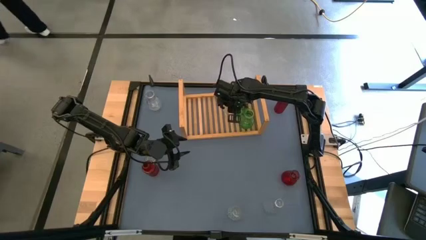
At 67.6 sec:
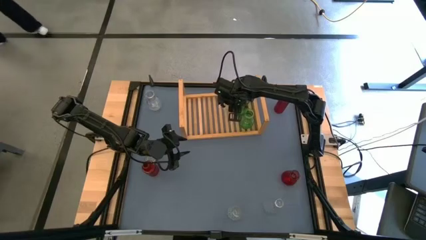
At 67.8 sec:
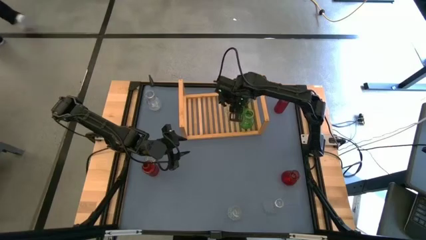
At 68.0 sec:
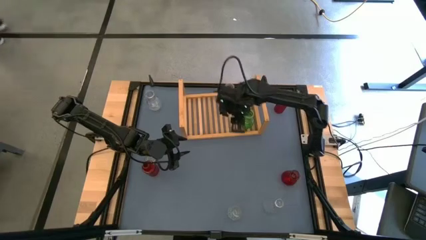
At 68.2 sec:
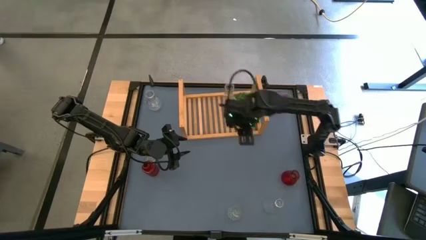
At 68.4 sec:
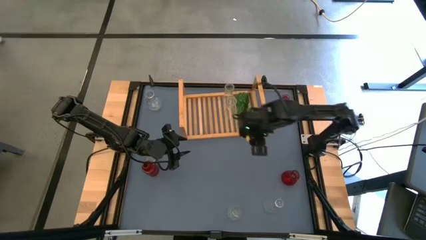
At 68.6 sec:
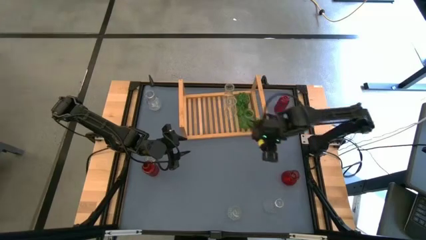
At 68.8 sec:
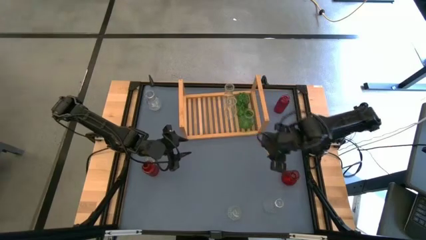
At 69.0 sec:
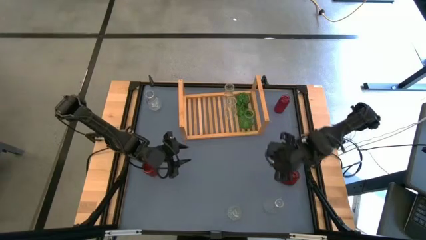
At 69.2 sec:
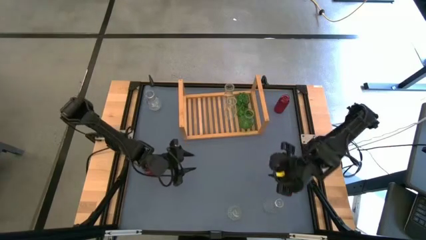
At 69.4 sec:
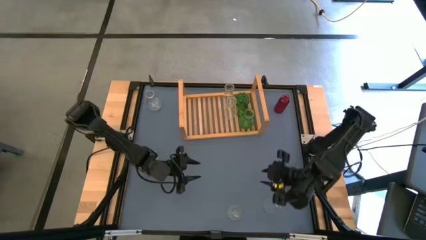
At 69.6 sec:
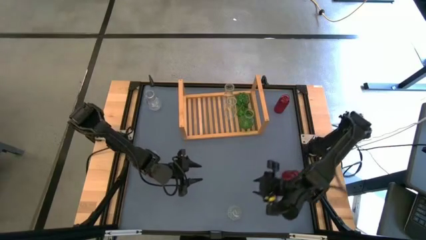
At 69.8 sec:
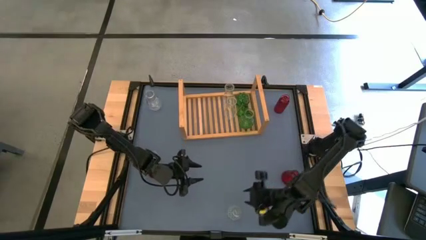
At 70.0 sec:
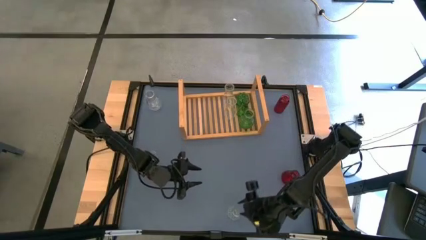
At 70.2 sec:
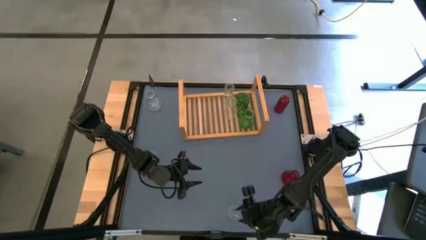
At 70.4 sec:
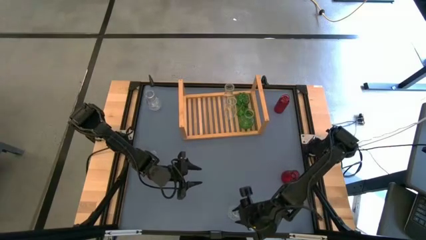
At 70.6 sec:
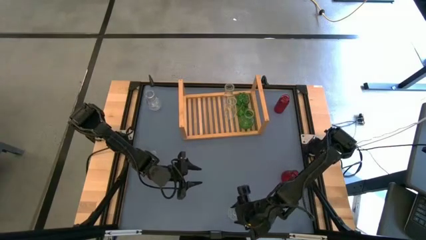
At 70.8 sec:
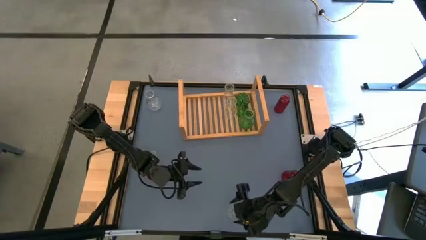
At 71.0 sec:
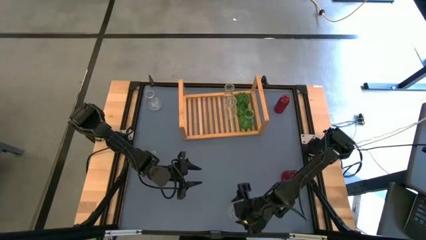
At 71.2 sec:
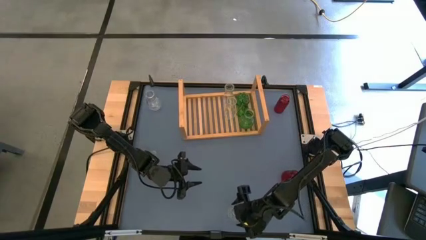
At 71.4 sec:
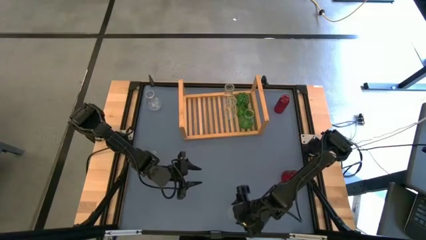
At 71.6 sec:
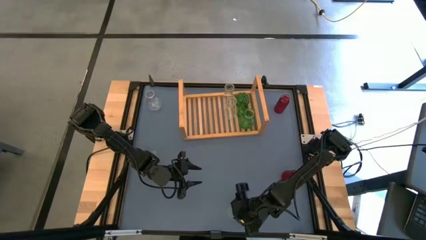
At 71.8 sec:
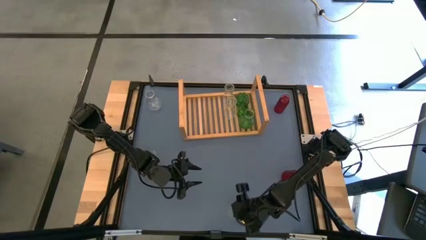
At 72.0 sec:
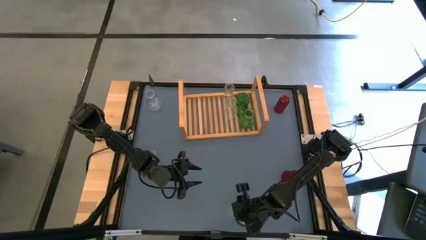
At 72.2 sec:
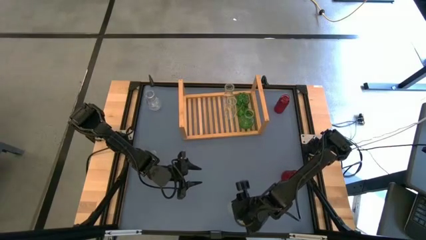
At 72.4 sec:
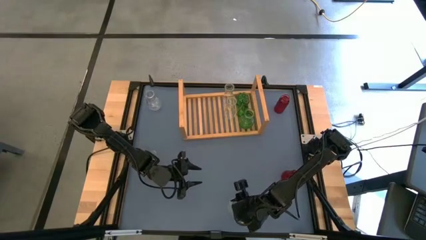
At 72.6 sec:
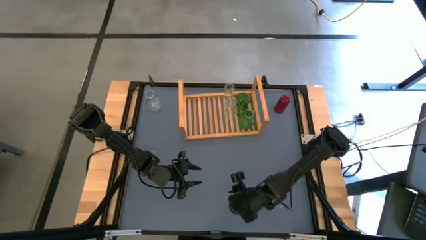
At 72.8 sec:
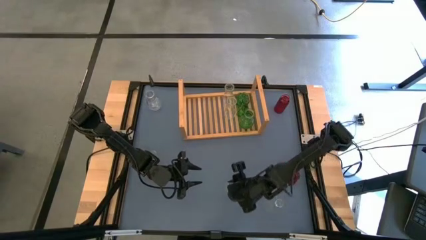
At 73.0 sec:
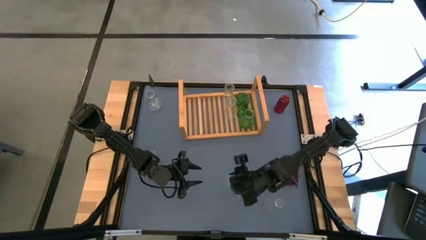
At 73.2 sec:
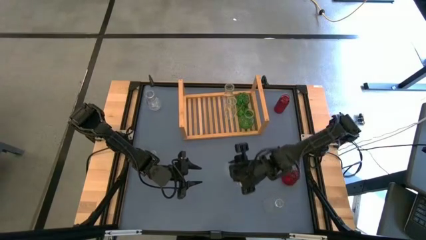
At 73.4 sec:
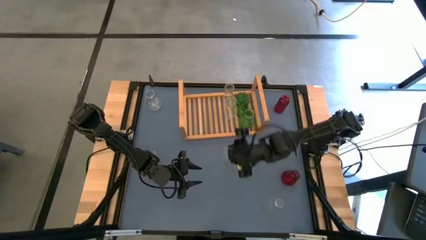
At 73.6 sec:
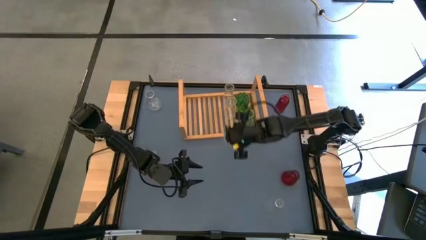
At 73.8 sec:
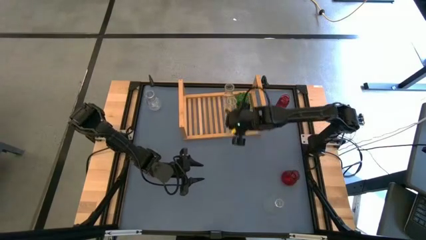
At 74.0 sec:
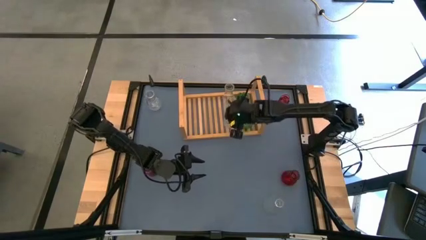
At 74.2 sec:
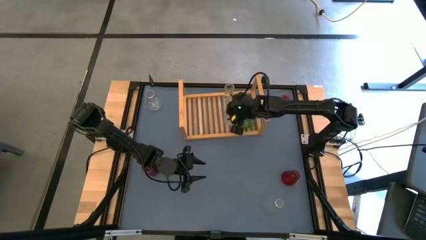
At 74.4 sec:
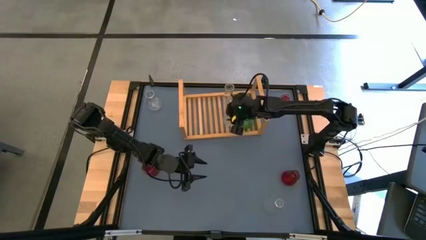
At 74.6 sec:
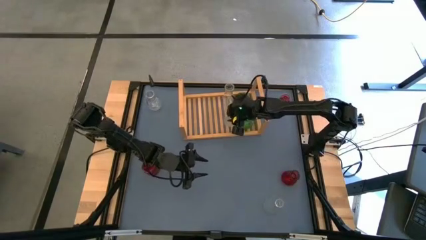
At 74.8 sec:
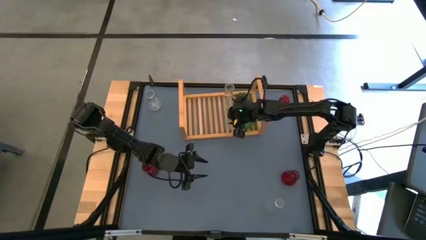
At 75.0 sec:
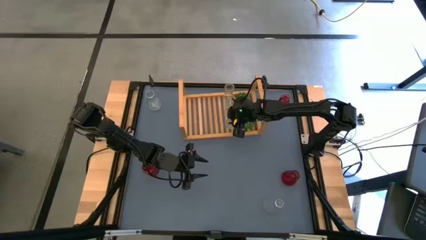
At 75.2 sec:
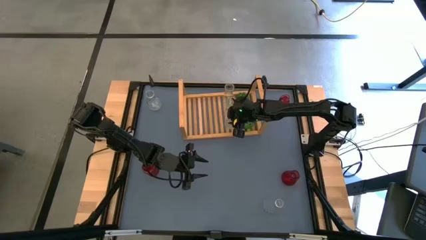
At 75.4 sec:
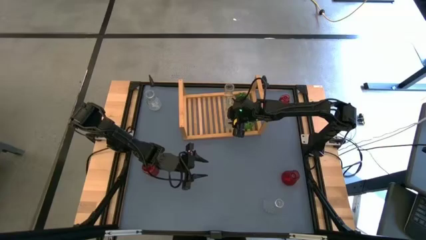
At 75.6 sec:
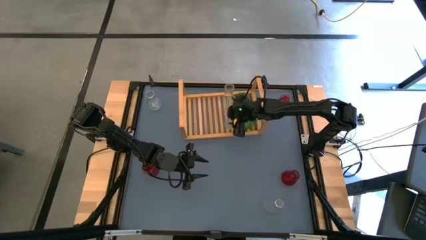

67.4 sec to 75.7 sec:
Task: sort vases onto shelf
Put the transparent vase on the shelf aligned with the other transparent vase

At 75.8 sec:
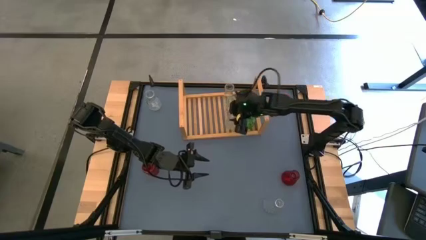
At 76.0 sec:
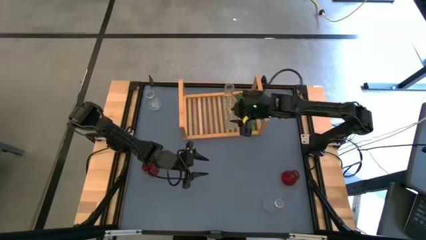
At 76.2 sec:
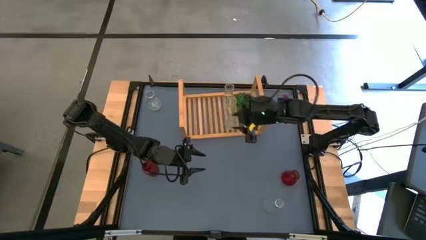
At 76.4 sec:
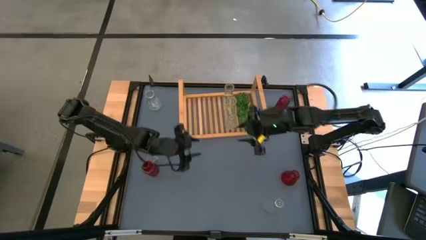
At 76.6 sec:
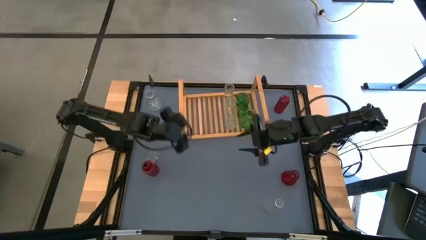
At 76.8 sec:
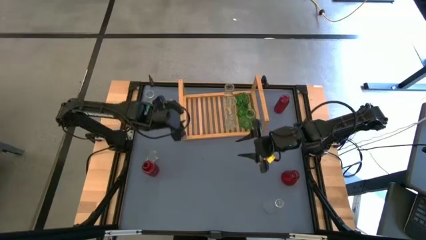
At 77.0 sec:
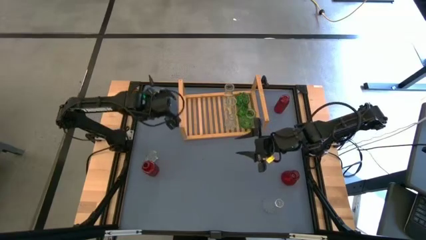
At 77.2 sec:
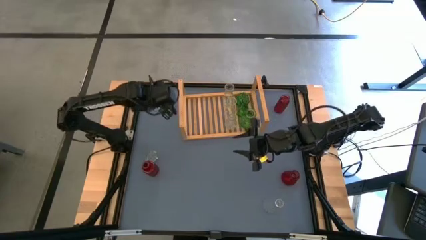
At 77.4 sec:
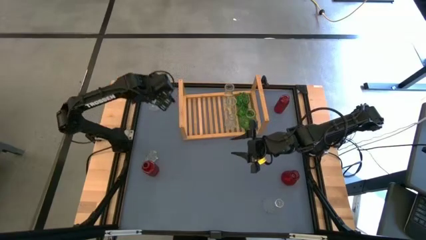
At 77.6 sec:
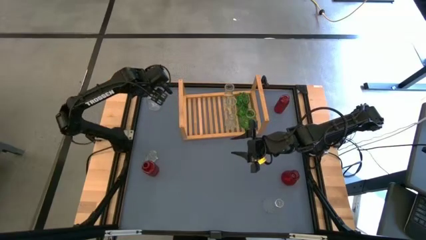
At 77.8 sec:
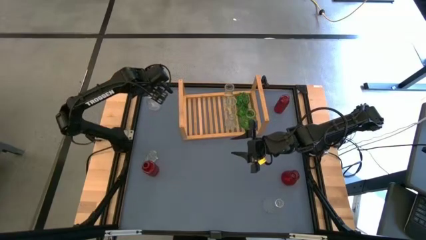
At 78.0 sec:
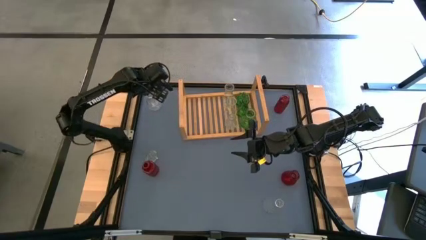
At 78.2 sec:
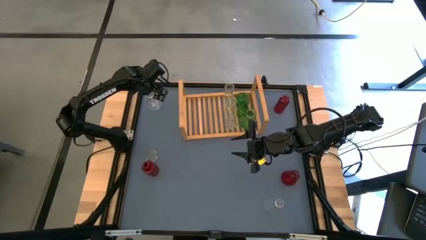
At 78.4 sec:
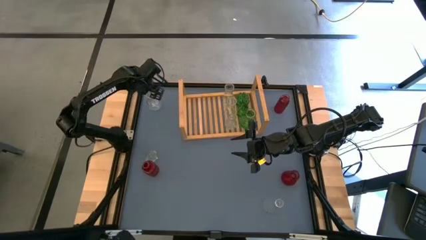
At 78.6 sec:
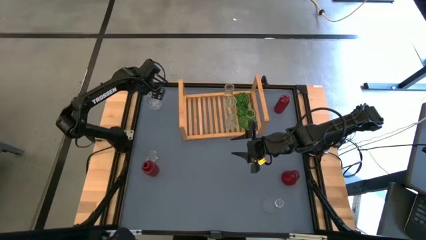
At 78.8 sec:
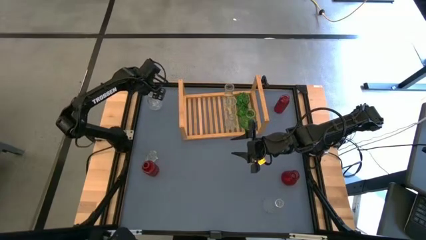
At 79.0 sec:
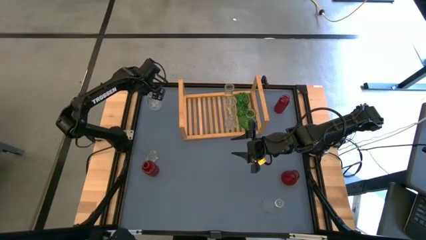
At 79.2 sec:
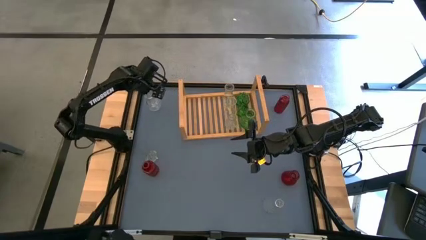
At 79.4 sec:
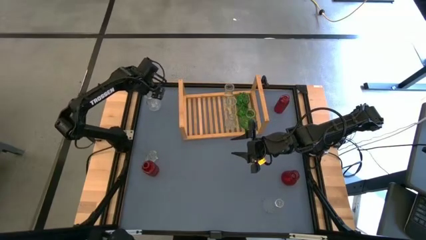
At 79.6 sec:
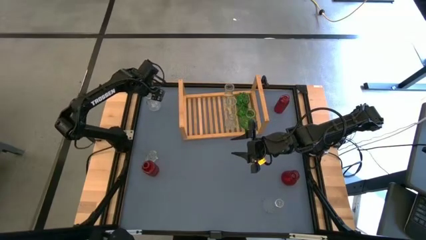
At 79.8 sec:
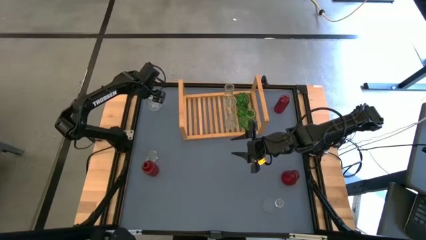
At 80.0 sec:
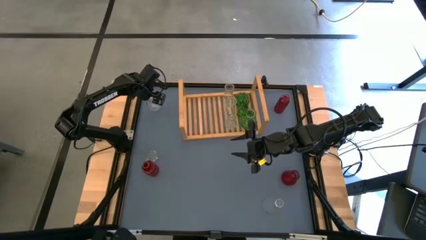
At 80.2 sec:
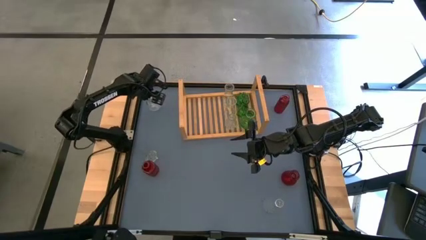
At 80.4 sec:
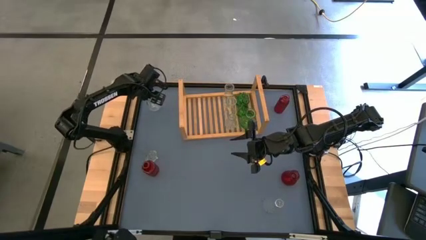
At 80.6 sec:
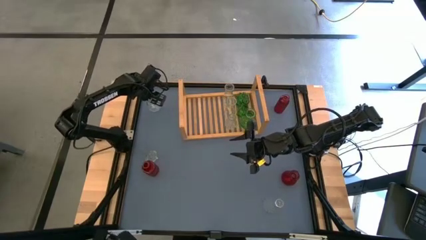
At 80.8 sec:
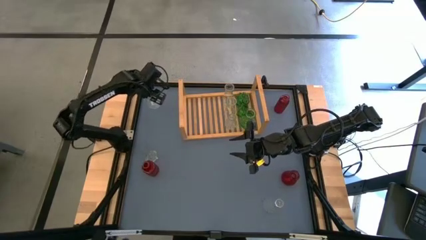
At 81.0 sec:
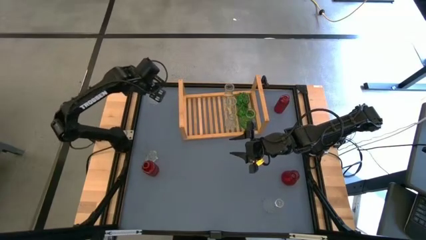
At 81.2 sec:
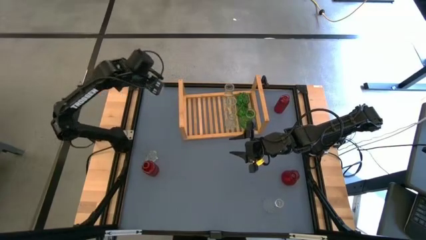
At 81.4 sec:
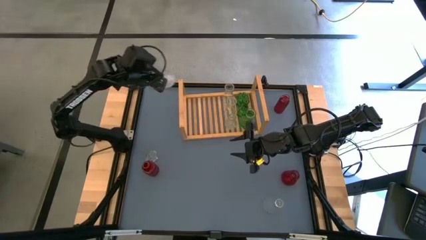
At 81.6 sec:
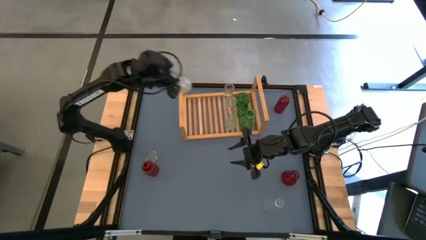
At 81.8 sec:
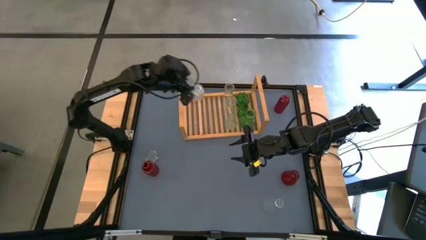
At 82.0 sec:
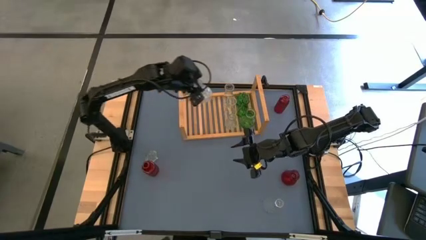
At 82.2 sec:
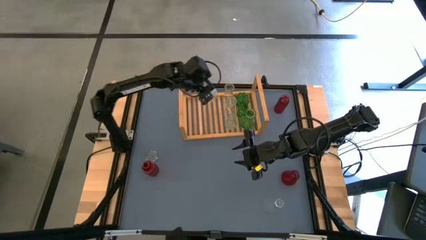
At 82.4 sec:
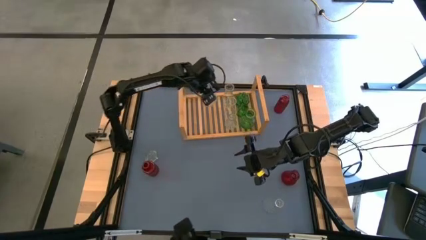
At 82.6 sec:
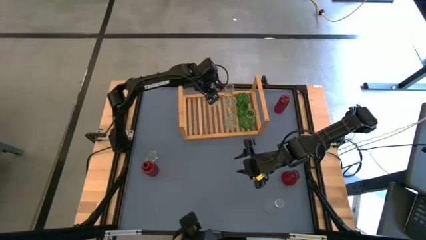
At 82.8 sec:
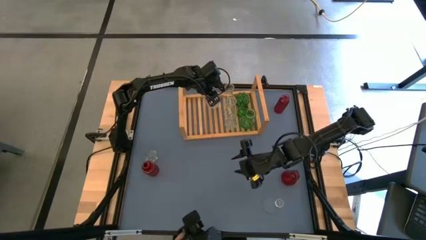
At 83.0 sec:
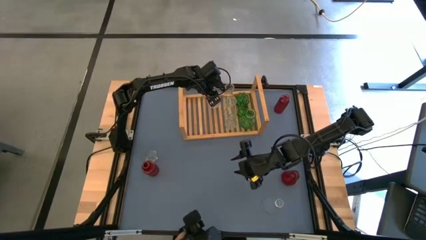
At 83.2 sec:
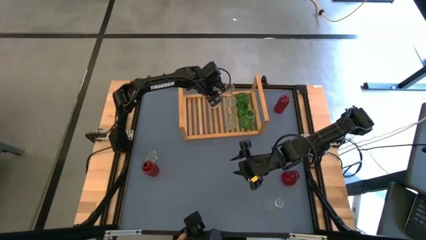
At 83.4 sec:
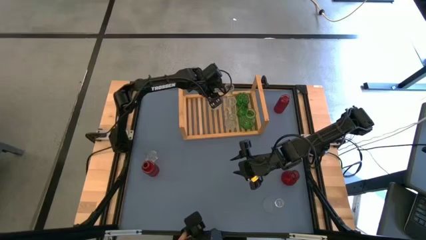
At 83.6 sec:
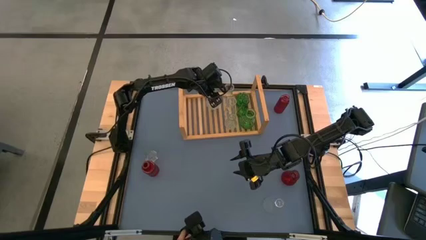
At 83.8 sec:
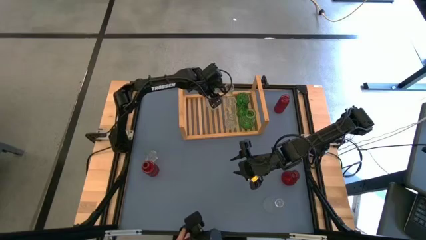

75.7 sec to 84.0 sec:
Put the transparent vase on the shelf
